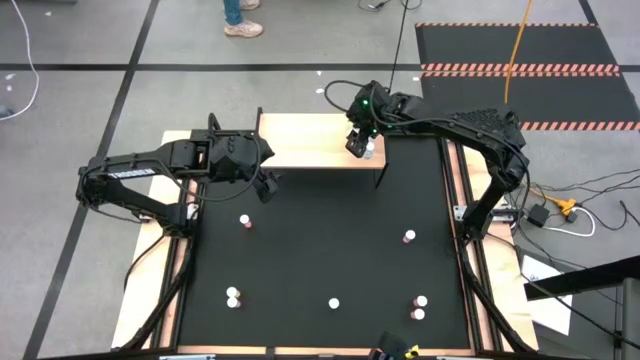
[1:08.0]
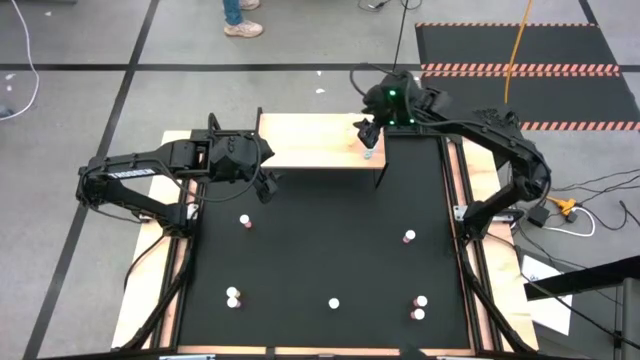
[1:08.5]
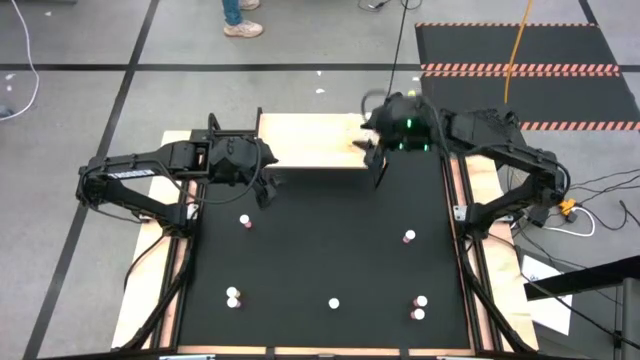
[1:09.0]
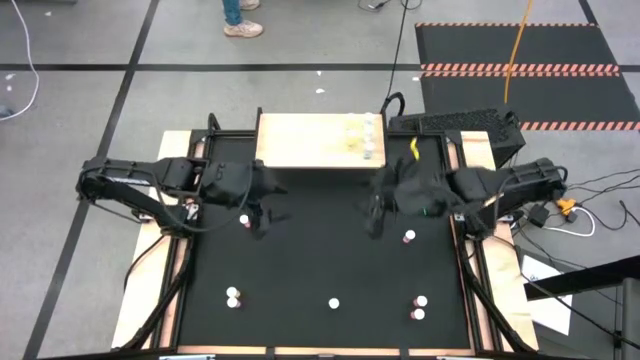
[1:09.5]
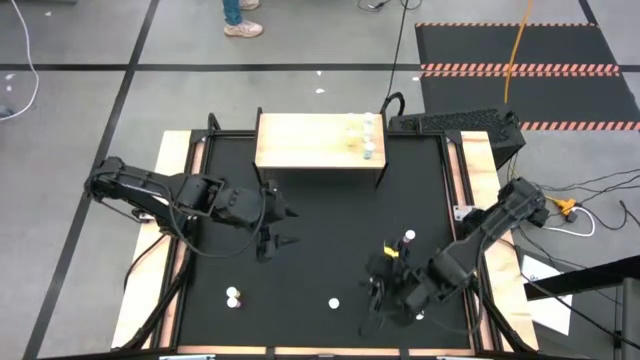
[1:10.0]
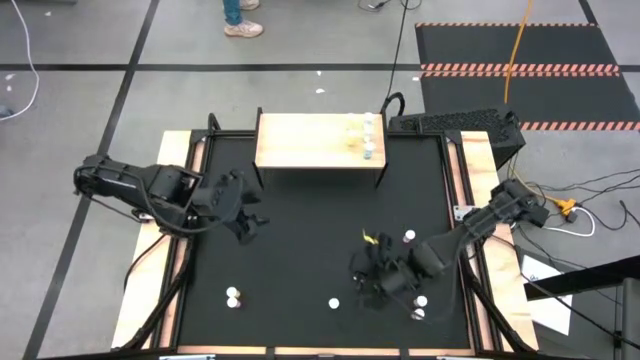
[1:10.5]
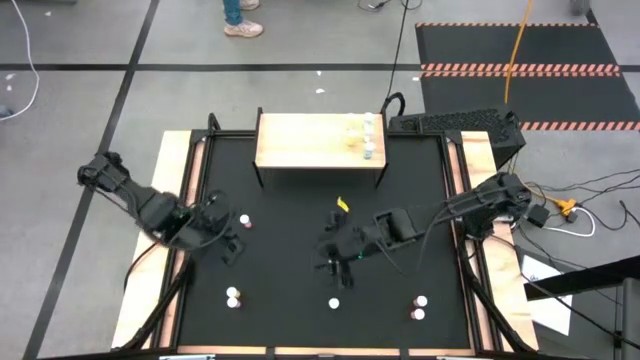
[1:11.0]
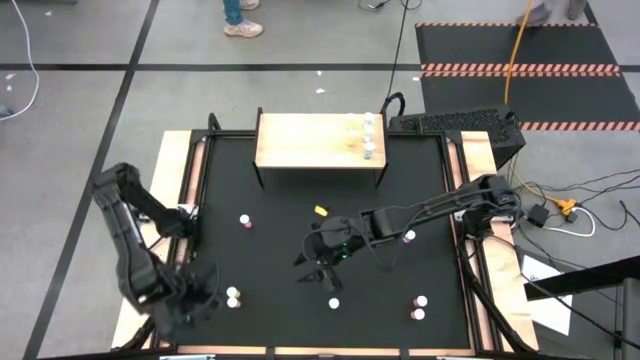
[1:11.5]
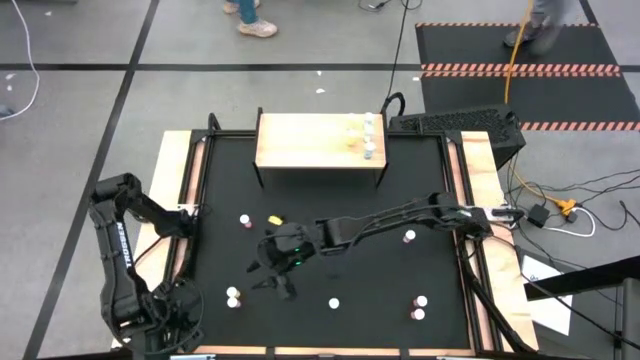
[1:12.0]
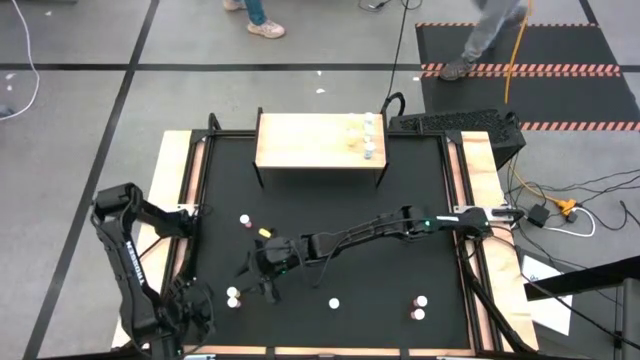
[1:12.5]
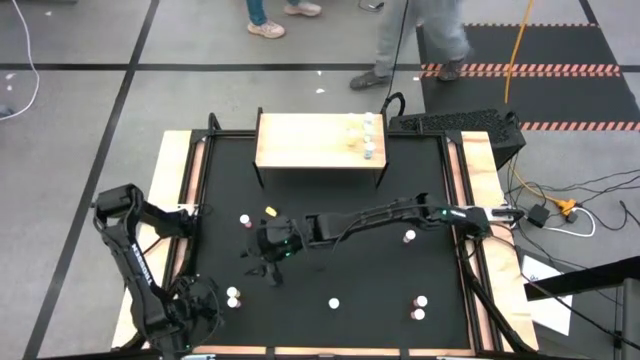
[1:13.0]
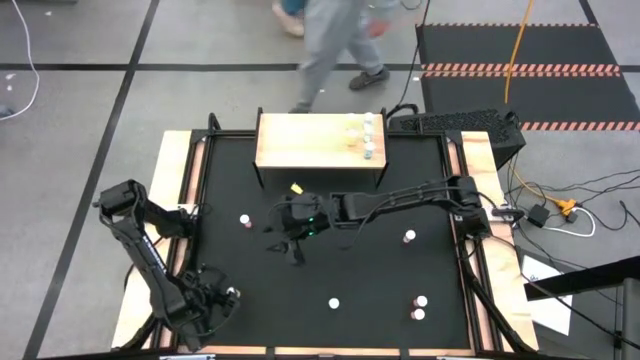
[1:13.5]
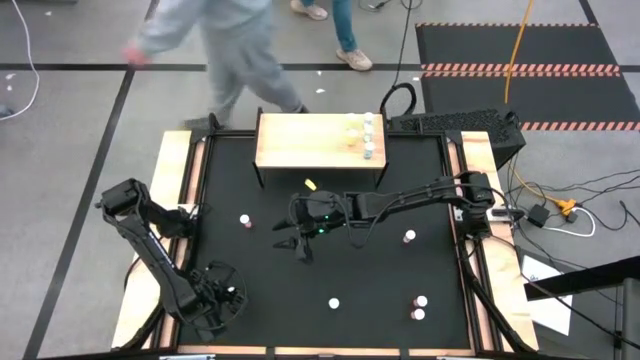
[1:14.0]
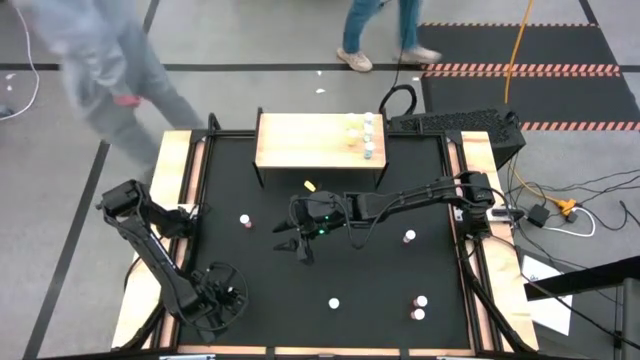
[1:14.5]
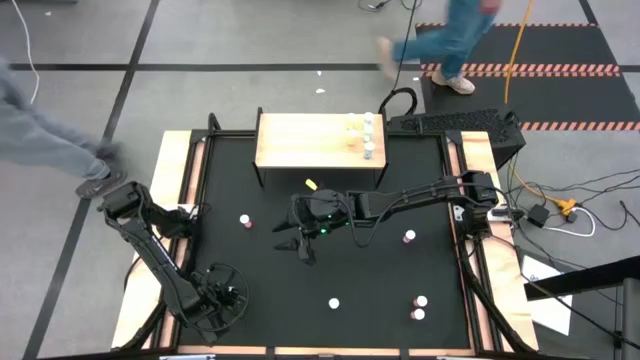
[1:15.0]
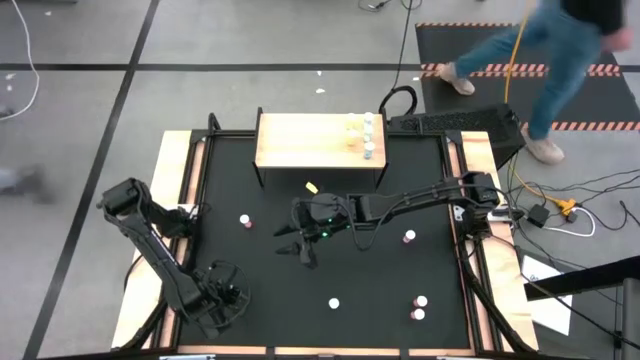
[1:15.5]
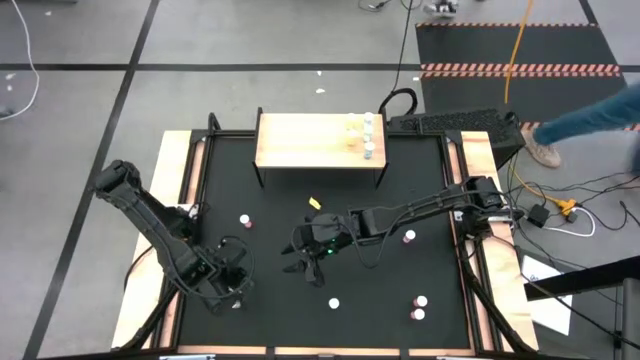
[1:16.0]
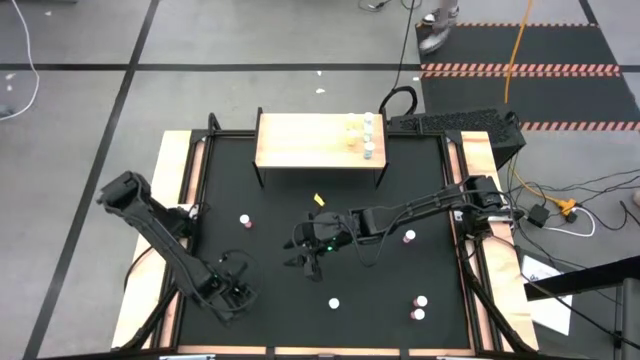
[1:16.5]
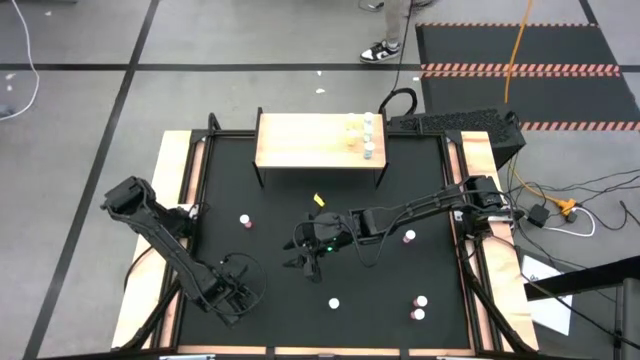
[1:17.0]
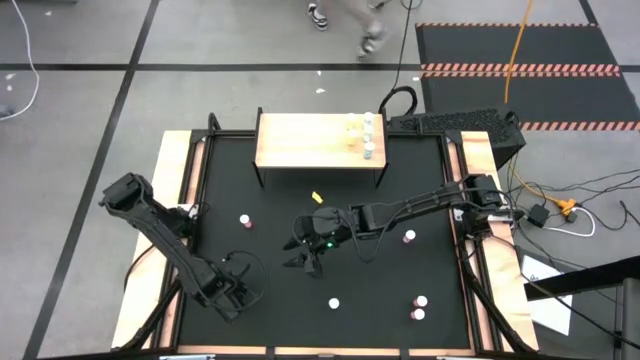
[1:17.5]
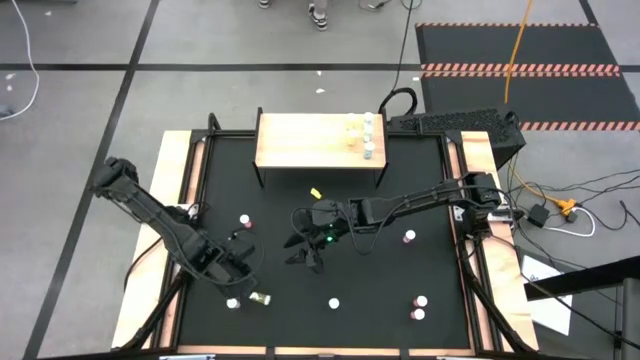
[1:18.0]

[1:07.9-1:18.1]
Task: Pick and place medicine bottles onto shelf by color
Put the yellow pill bottle on the shelf aligned with the other yellow pill bottles

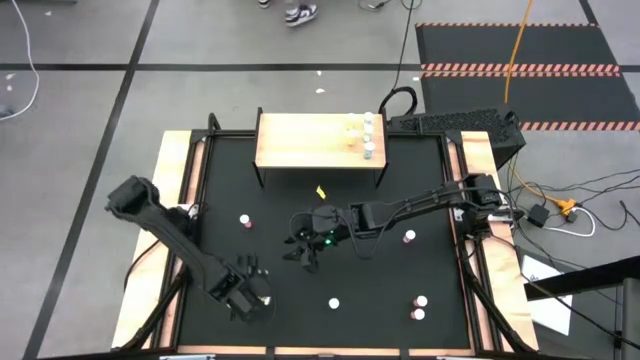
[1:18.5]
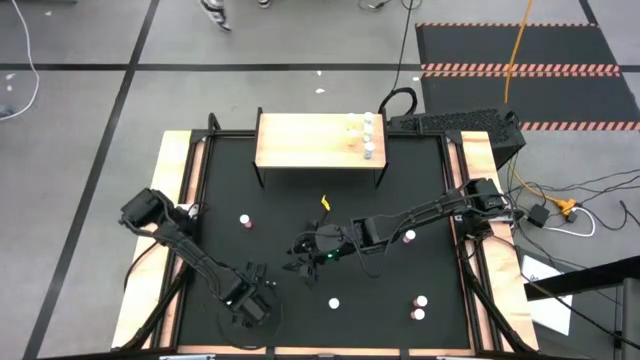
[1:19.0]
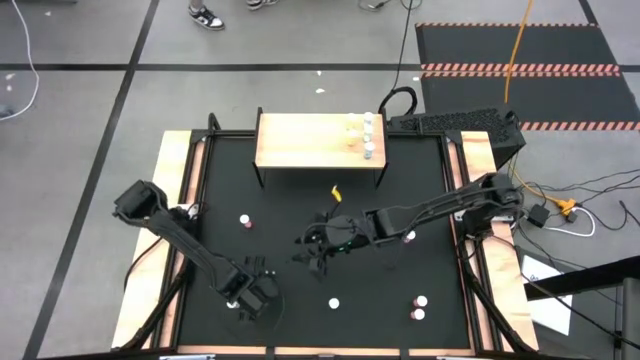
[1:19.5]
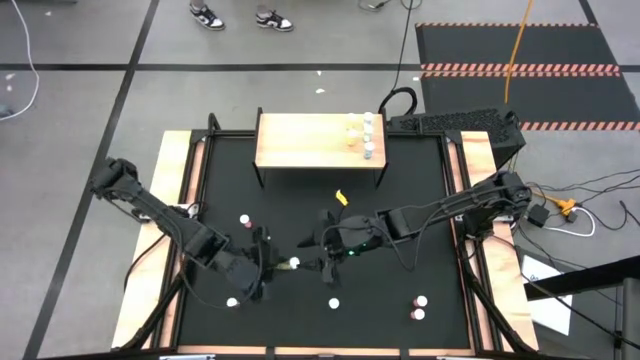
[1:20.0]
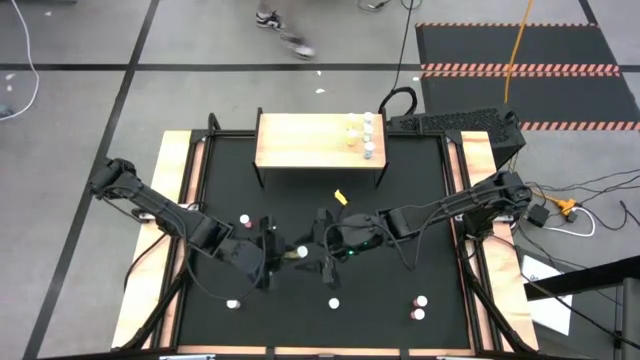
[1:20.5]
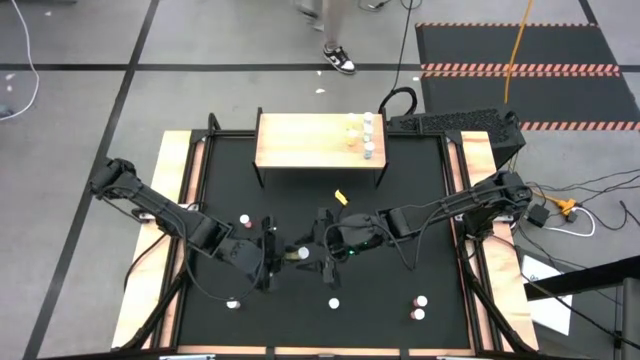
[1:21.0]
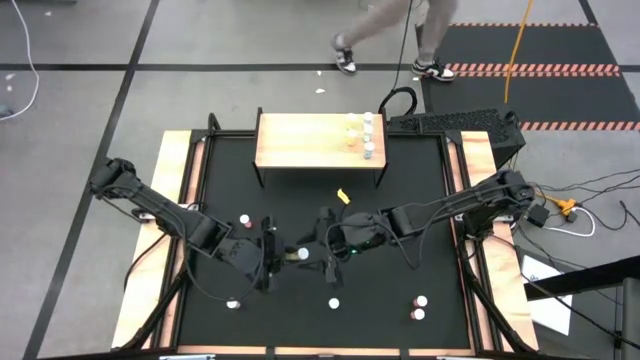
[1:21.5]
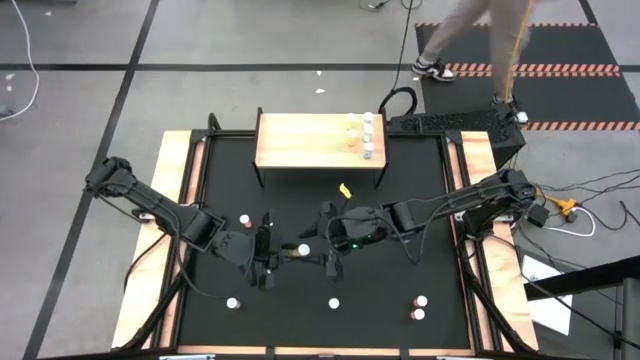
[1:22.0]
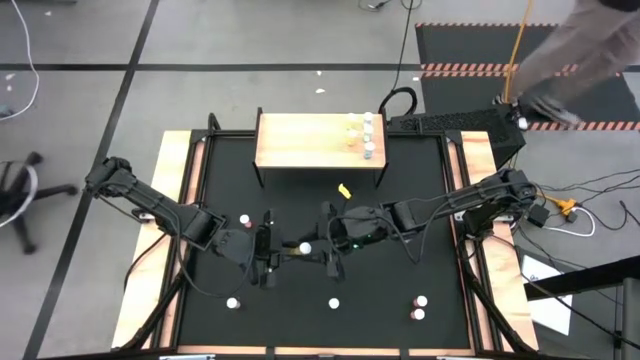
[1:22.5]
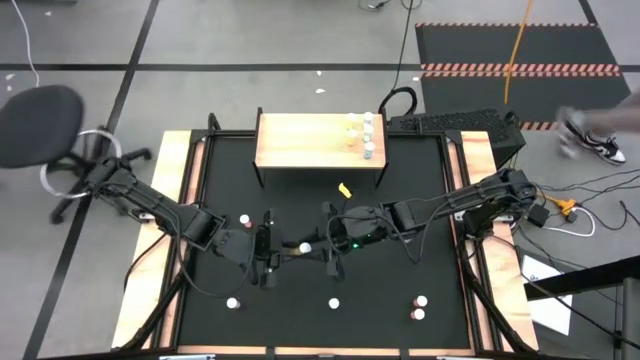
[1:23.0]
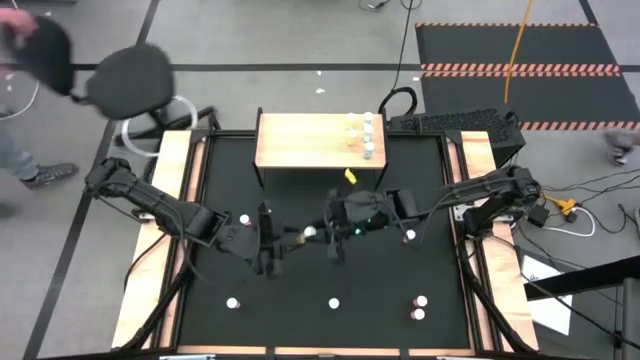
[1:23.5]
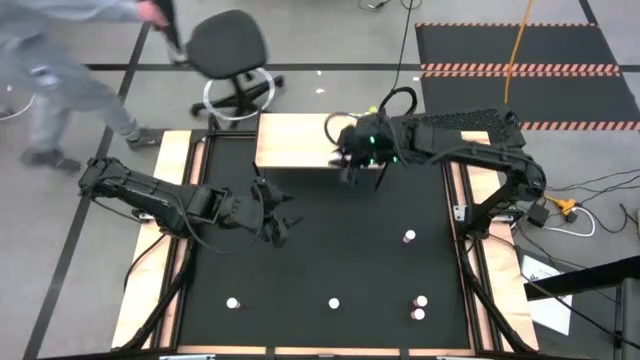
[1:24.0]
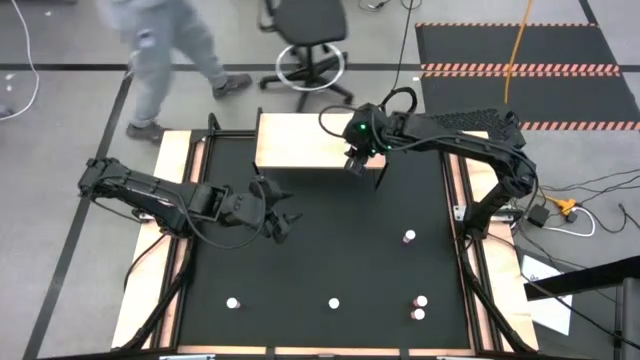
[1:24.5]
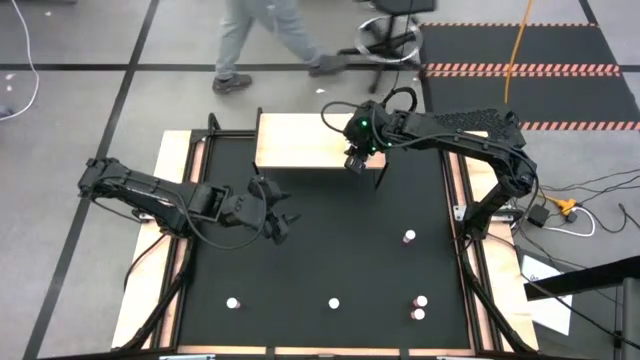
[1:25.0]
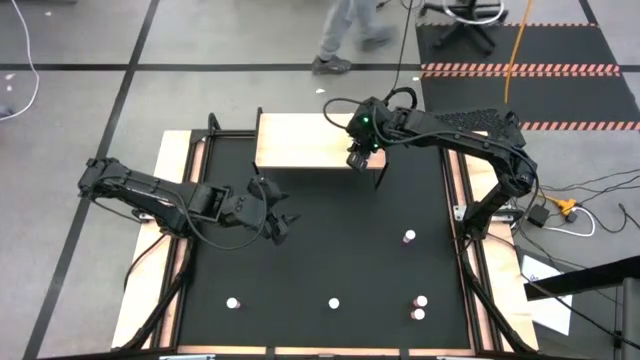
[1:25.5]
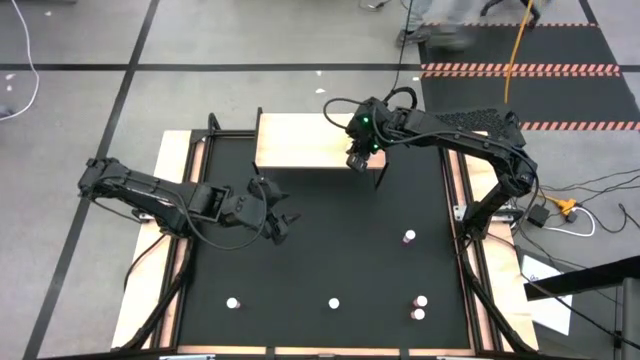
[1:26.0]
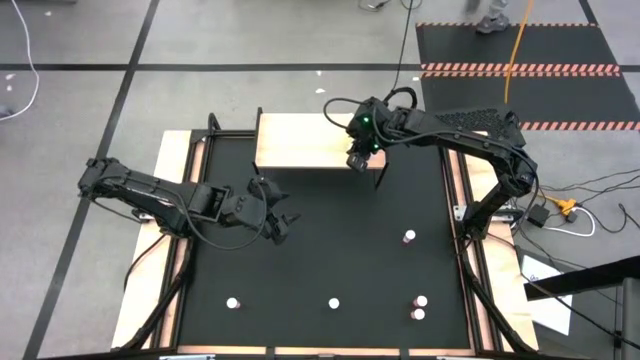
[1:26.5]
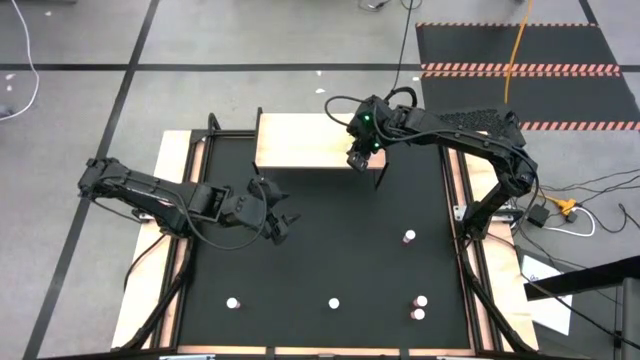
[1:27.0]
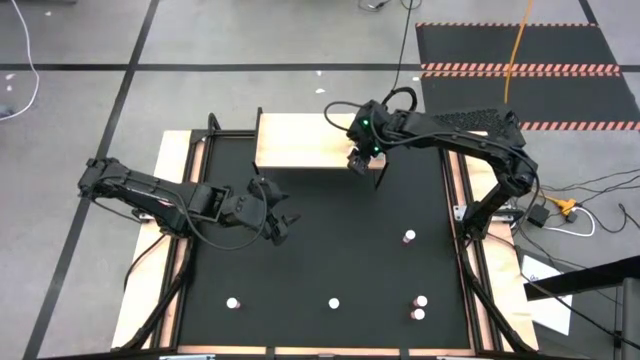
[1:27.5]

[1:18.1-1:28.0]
Put the yellow pill bottle on the shelf aligned with the other yellow pill bottles
